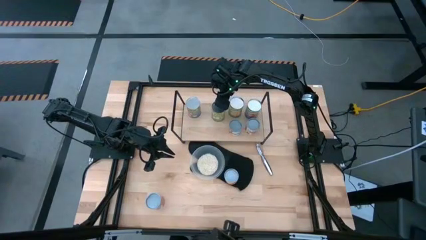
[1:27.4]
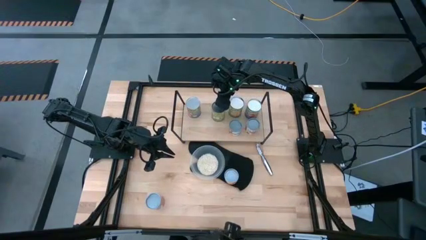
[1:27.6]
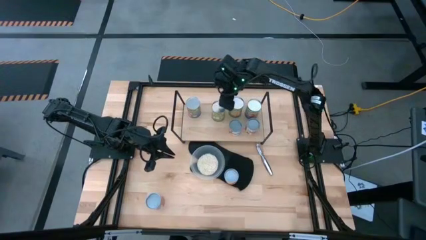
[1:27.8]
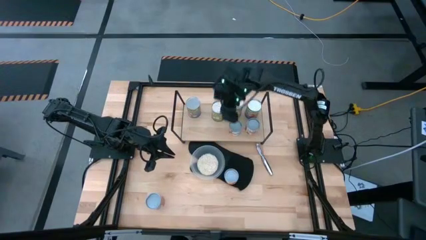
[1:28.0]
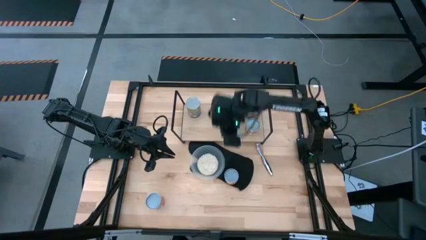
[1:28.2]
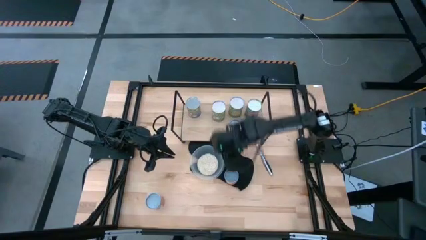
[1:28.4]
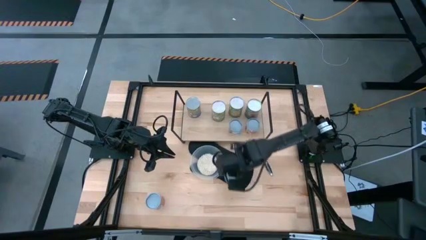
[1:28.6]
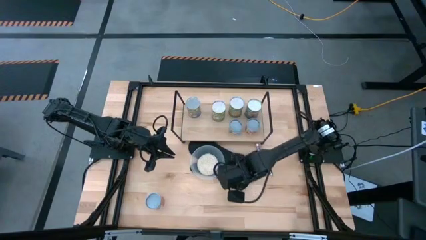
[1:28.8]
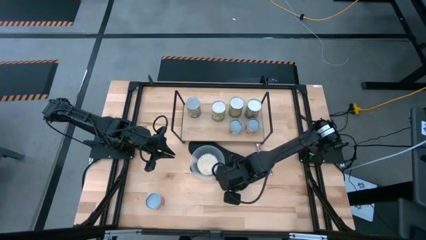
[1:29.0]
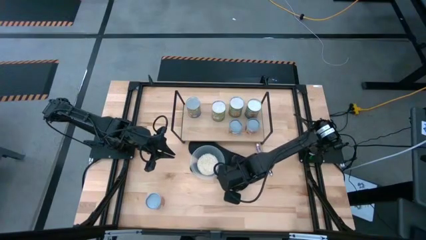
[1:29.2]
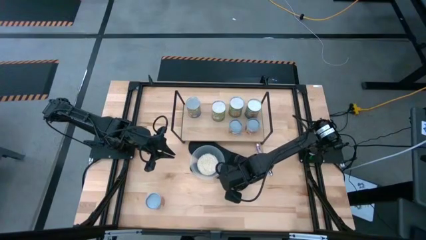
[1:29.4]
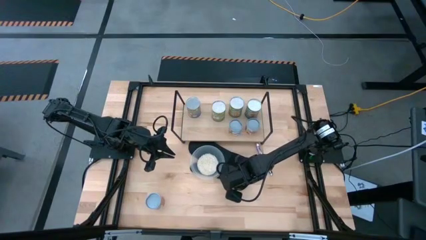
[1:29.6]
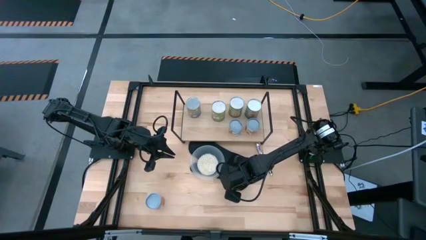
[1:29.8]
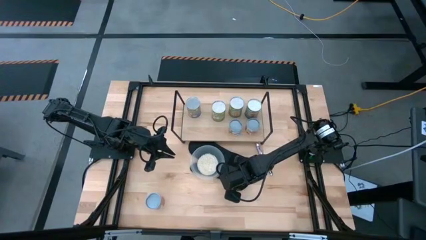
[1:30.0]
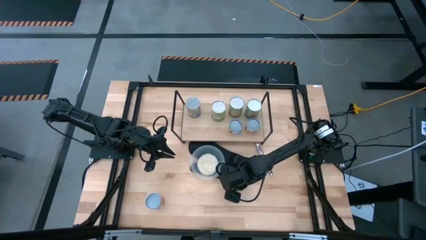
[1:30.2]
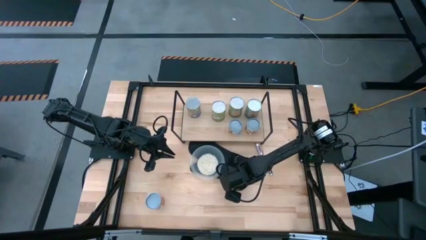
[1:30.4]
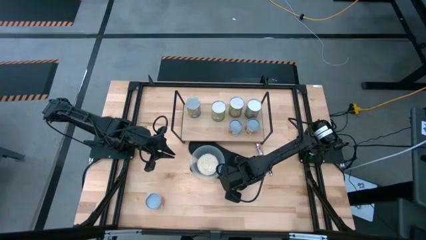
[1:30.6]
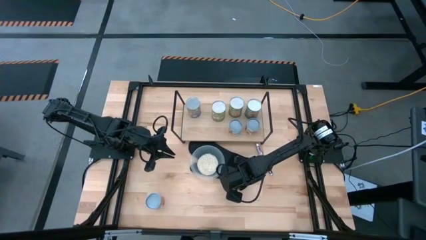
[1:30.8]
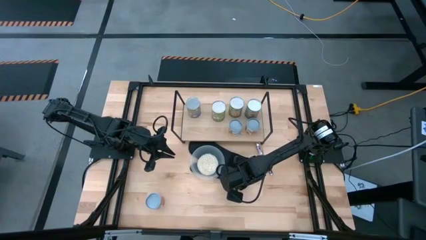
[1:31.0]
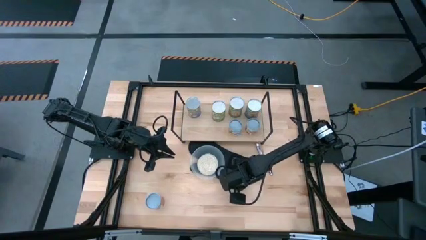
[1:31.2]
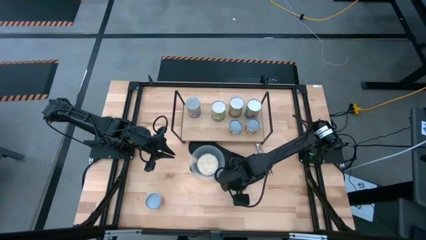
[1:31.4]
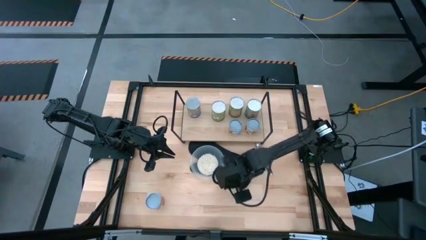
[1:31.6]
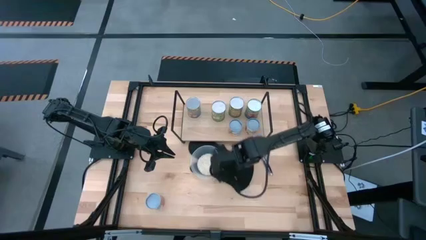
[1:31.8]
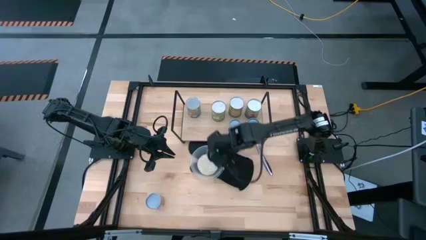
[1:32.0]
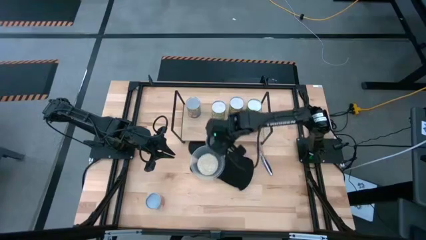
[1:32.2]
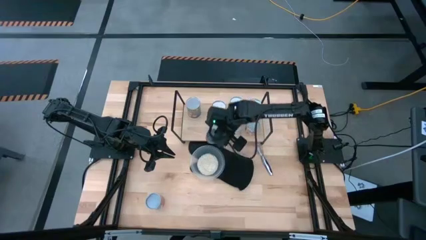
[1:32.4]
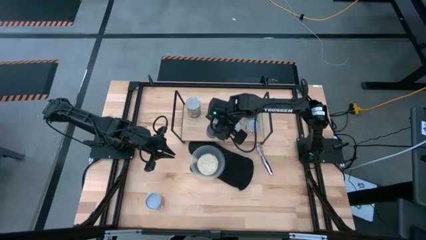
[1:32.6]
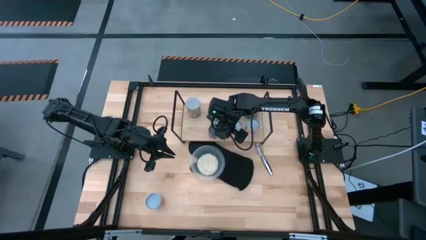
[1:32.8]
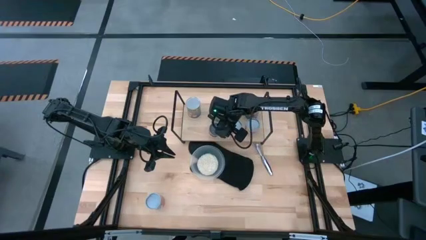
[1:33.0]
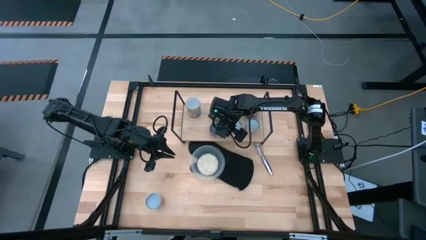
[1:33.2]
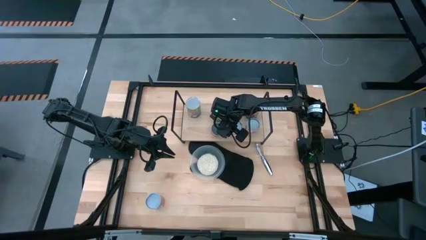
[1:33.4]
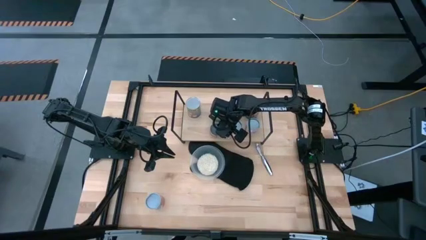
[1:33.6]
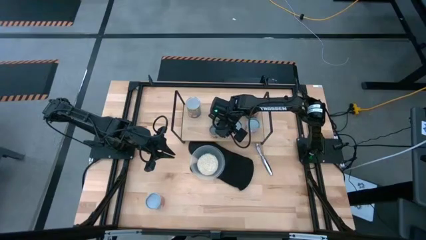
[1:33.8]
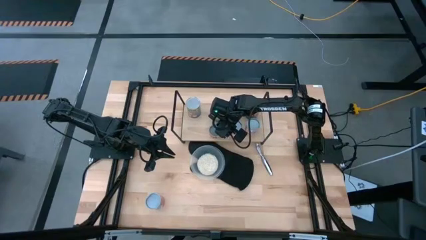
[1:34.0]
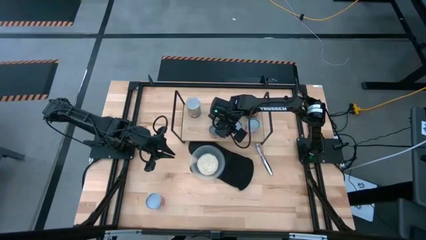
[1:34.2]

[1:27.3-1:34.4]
Task: Pick and place cans onto a shelf
Put the canned pineapple rings on the shelf

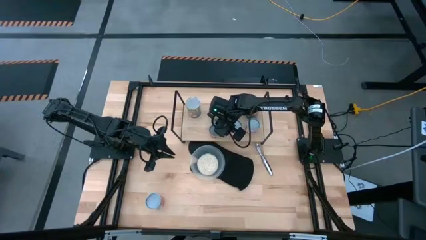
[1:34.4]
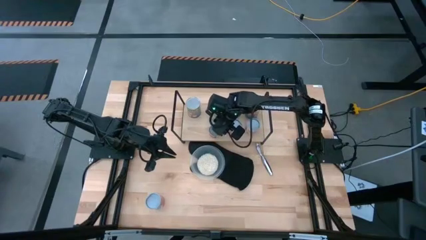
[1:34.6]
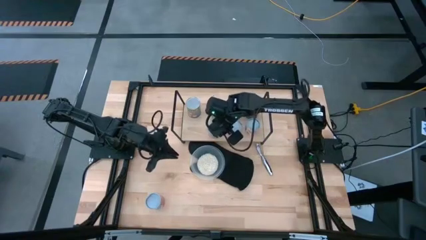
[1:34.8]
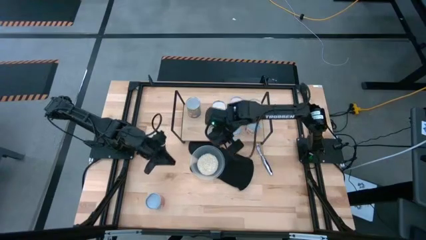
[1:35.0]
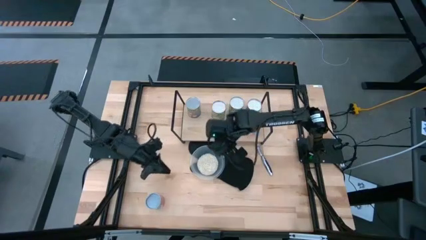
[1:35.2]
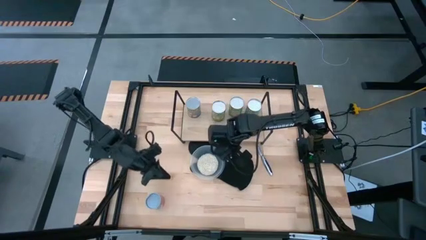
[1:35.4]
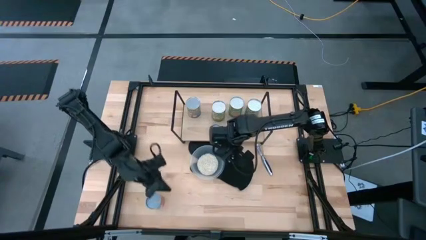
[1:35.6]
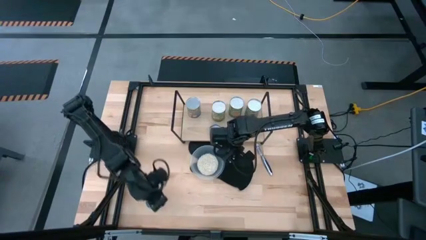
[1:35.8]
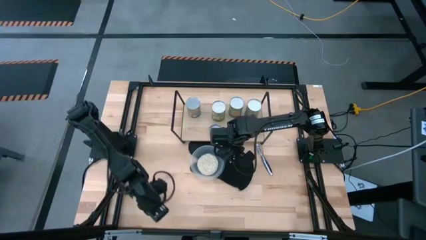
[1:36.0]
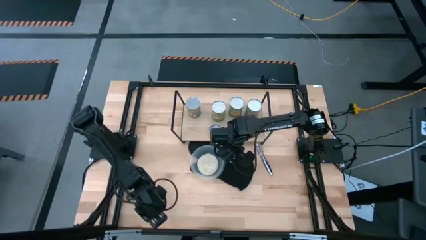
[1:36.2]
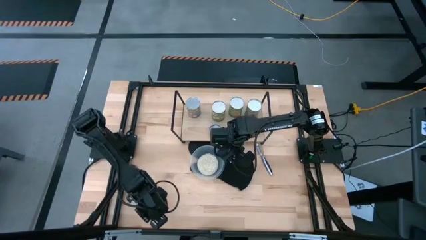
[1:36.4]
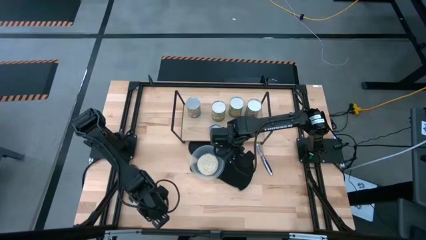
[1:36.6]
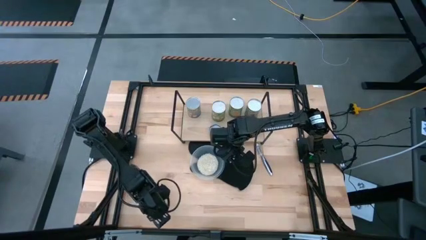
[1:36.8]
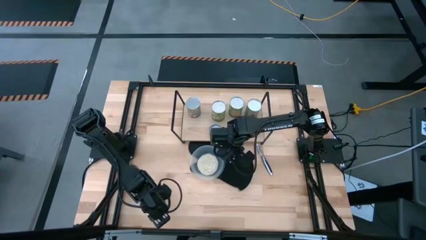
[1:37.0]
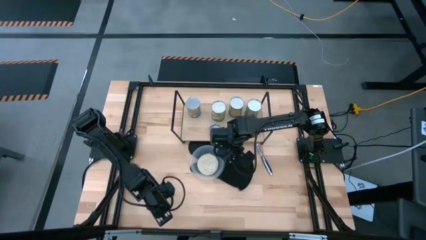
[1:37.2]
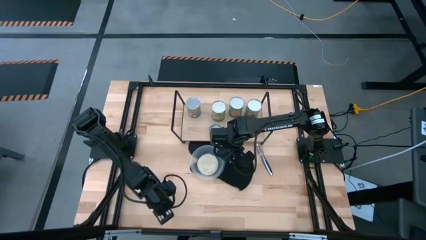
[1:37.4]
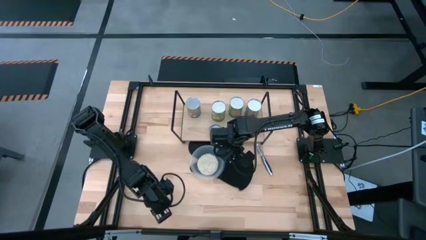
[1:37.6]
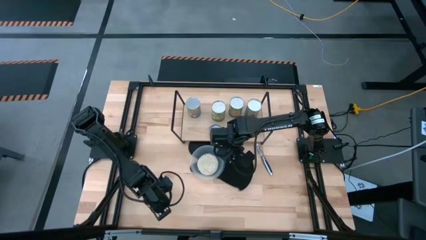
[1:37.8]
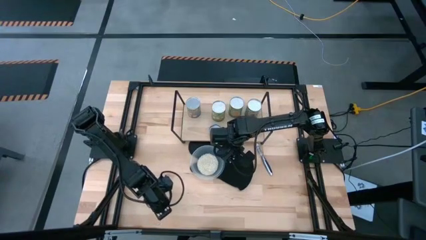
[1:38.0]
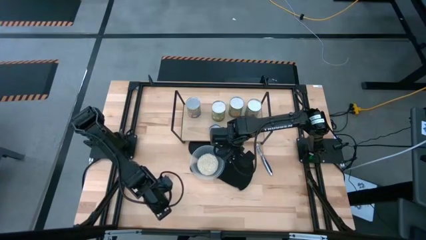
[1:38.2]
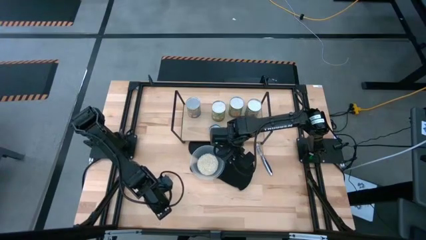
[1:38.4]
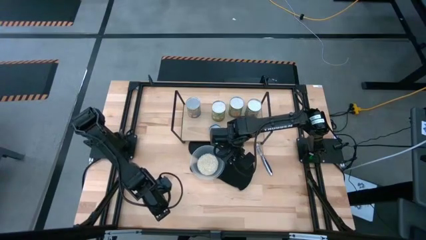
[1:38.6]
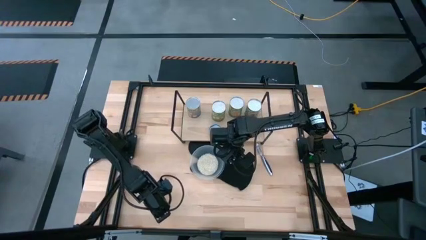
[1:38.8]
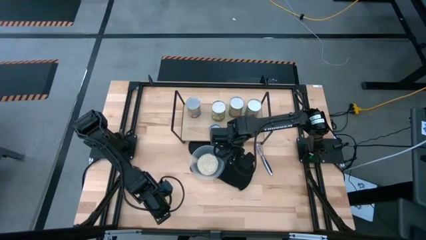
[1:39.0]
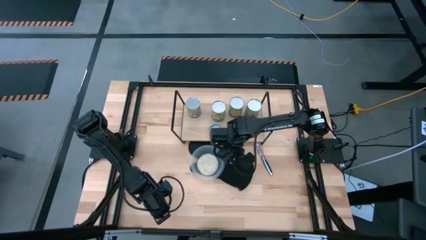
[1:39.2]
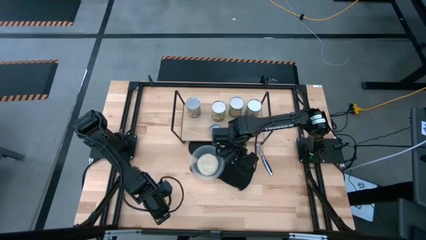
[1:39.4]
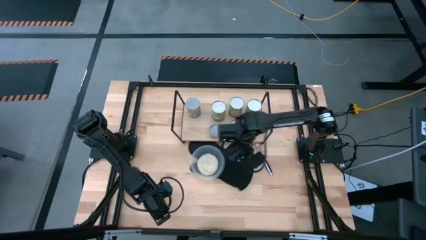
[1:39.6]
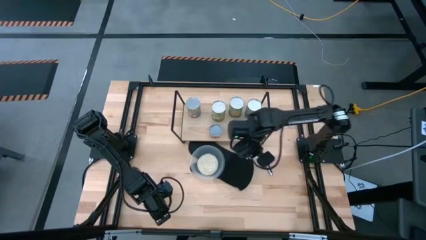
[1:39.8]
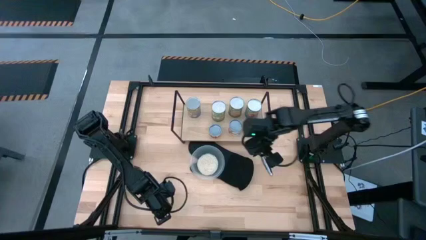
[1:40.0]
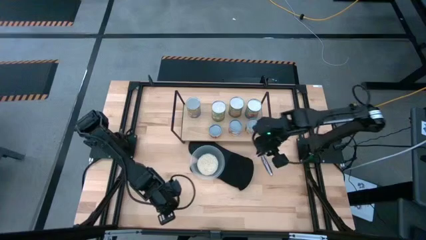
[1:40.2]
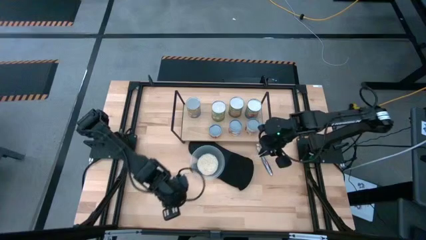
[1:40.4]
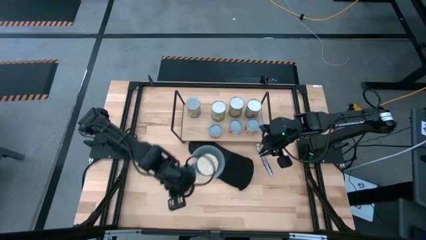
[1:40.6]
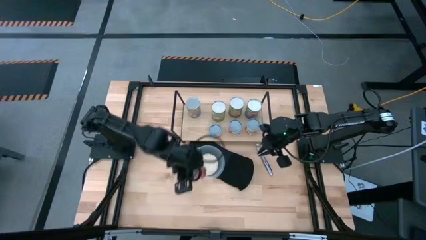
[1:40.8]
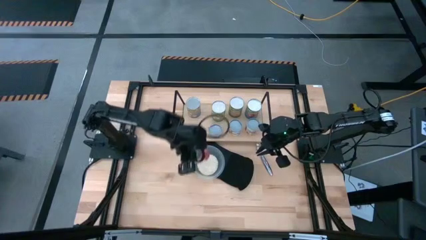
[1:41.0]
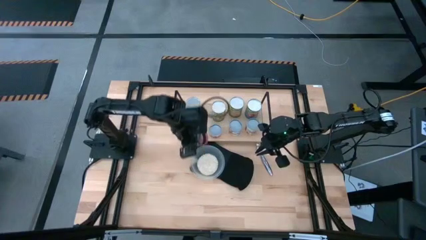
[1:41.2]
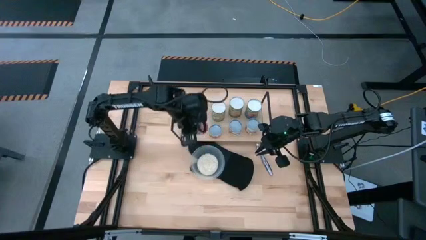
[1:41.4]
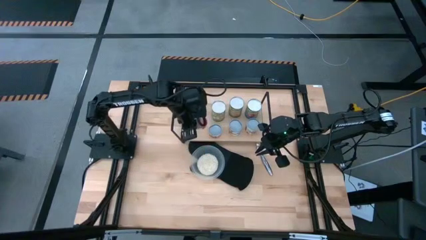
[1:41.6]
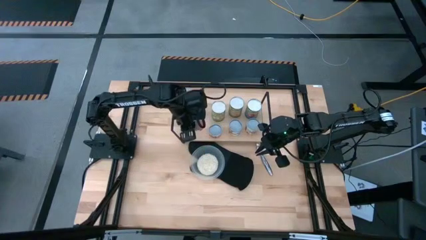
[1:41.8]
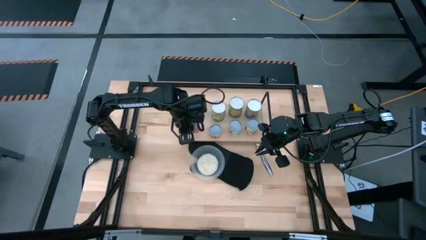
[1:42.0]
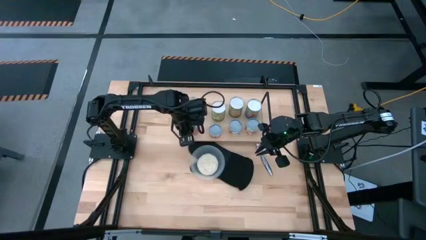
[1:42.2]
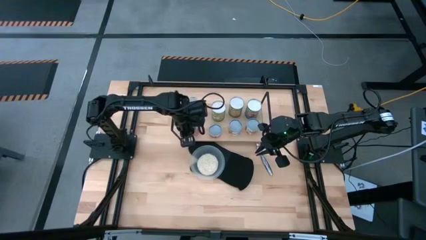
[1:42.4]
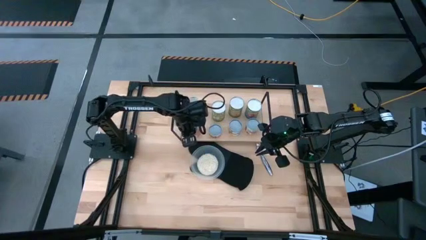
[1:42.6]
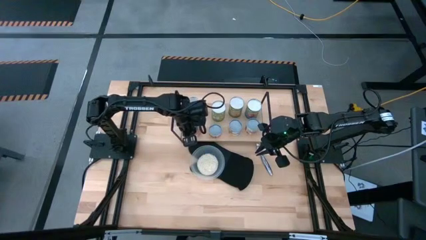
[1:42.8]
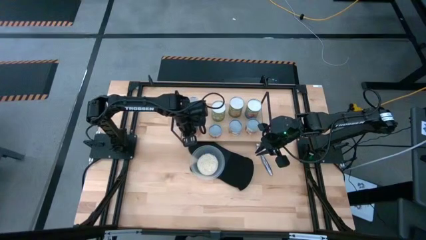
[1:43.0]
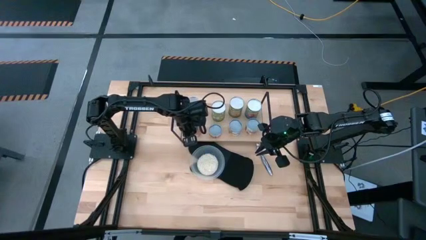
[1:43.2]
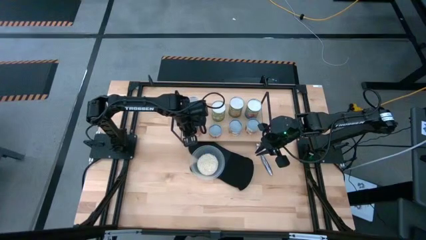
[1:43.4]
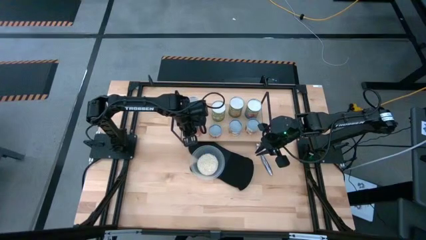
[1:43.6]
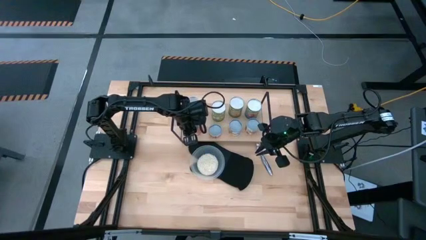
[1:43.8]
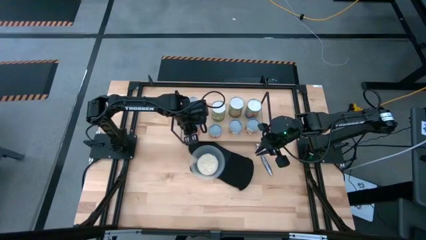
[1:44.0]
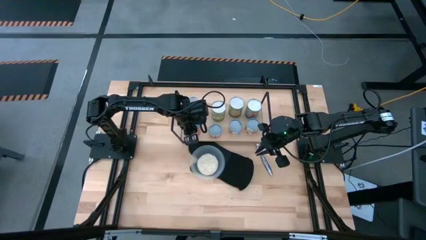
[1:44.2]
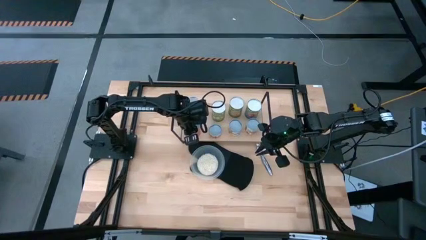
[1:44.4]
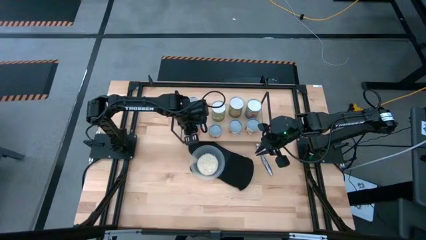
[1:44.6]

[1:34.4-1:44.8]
Put the canned mix fruits on the shelf
